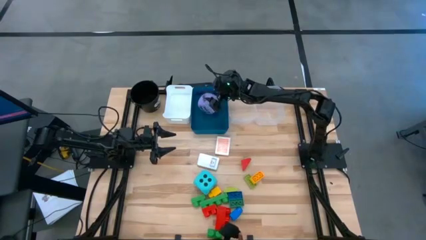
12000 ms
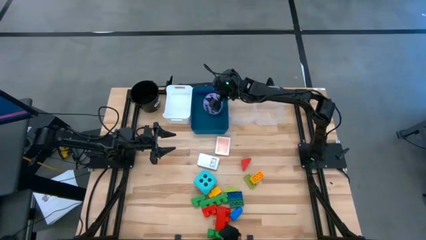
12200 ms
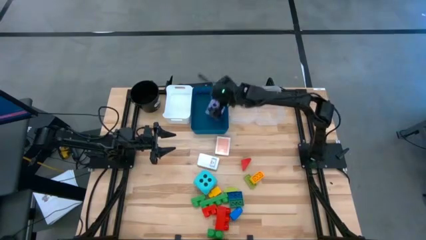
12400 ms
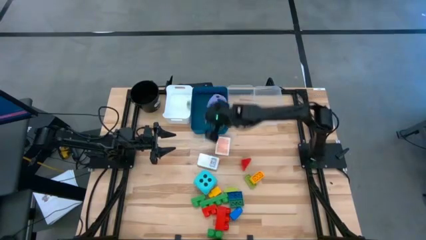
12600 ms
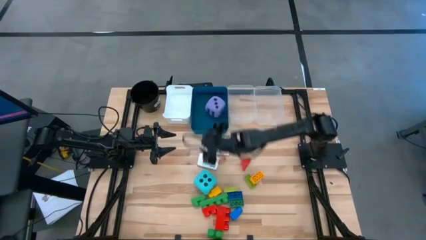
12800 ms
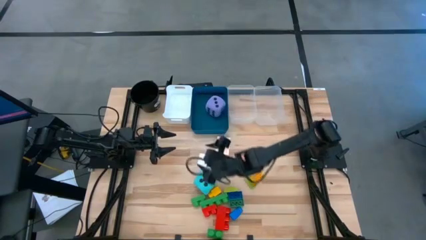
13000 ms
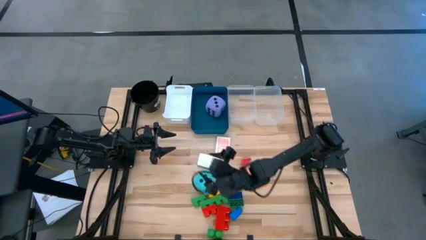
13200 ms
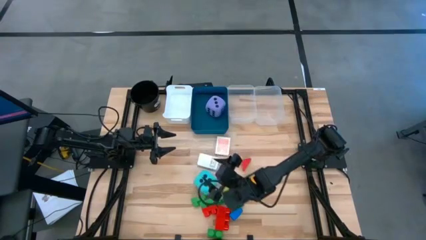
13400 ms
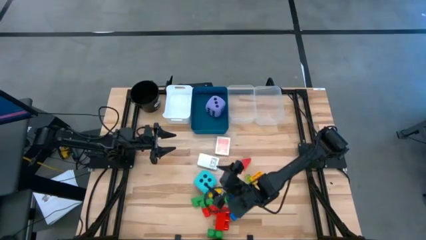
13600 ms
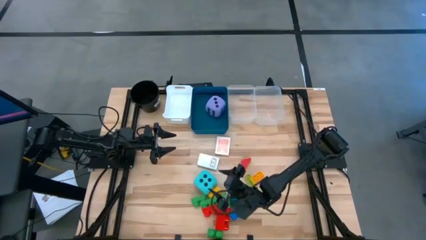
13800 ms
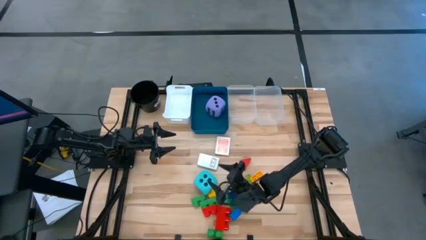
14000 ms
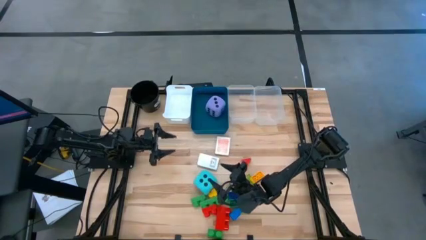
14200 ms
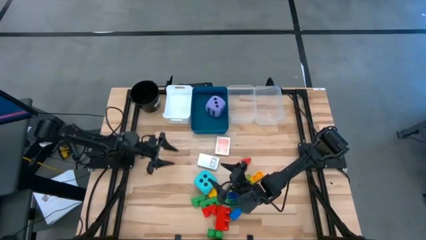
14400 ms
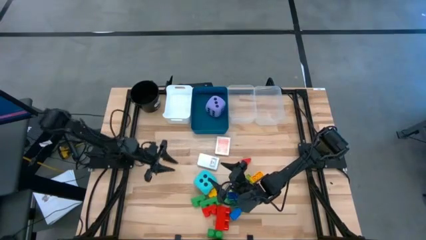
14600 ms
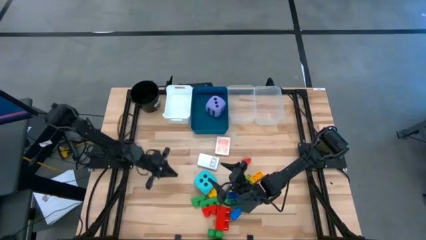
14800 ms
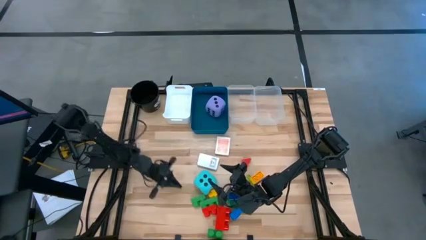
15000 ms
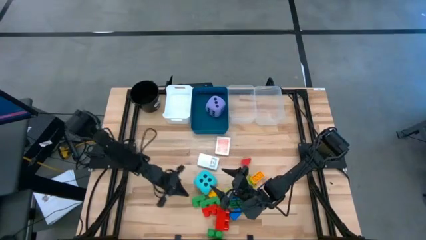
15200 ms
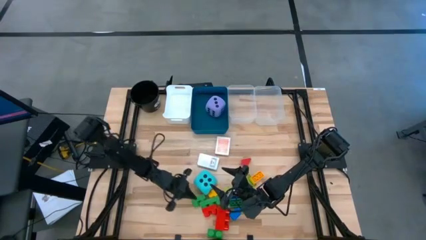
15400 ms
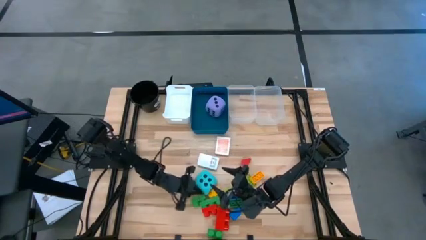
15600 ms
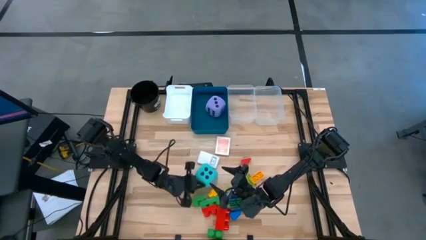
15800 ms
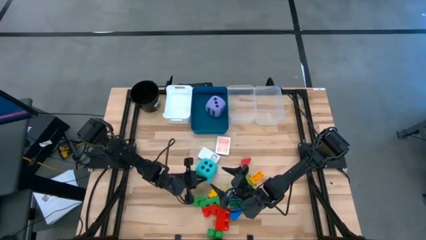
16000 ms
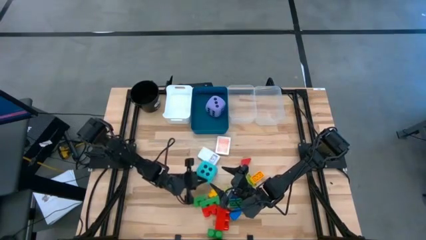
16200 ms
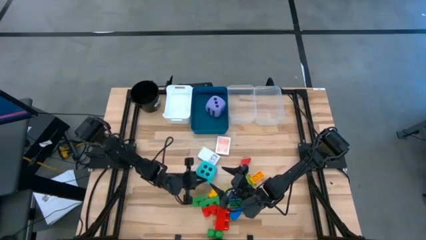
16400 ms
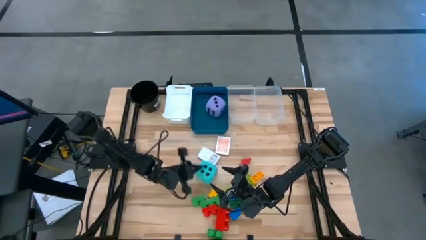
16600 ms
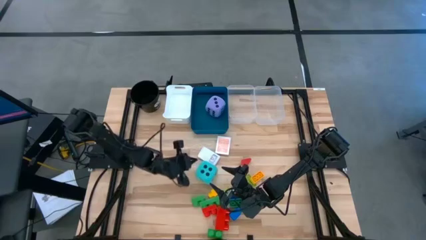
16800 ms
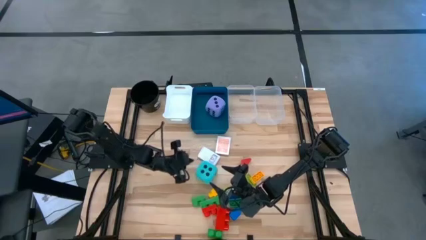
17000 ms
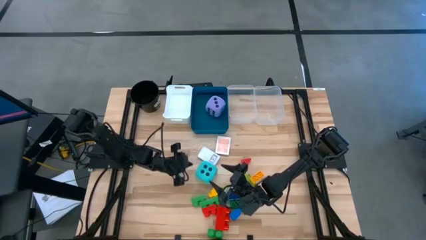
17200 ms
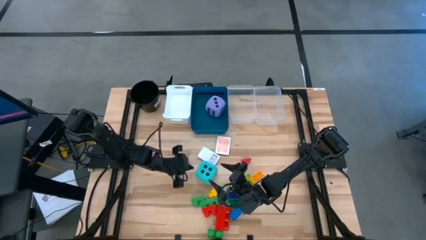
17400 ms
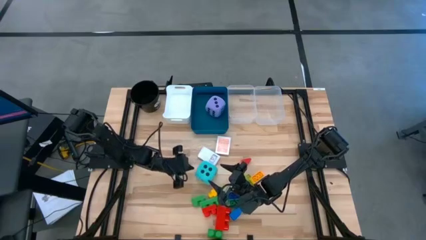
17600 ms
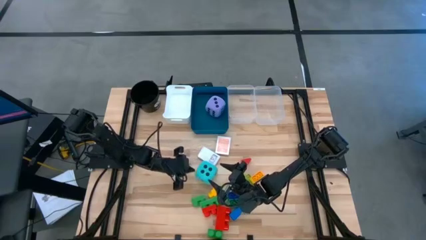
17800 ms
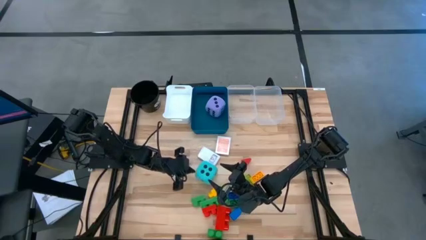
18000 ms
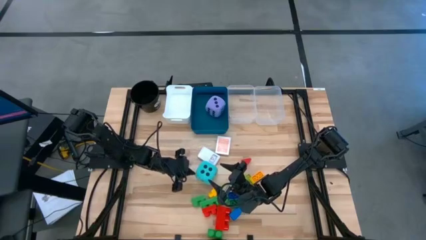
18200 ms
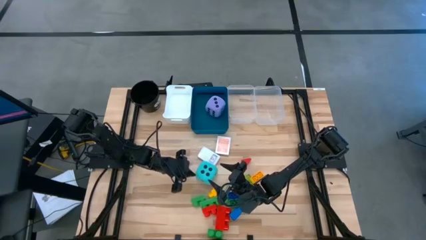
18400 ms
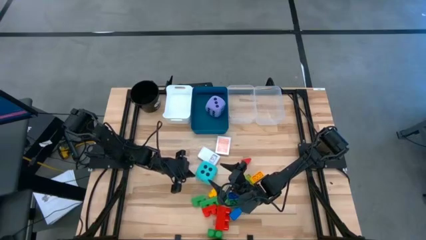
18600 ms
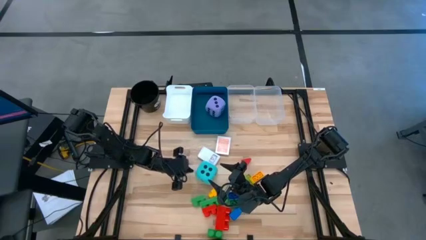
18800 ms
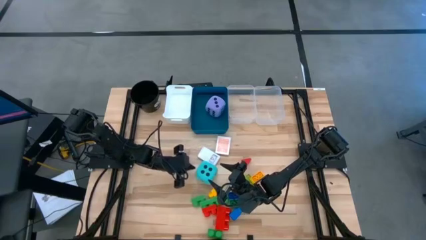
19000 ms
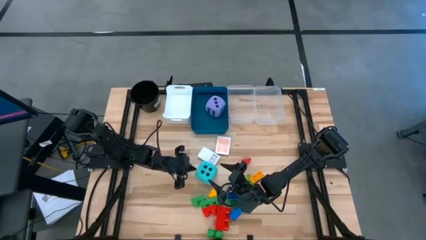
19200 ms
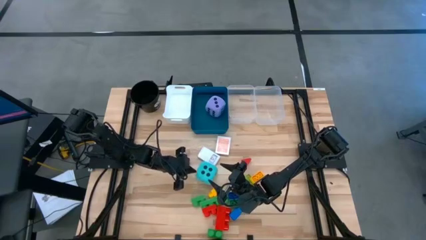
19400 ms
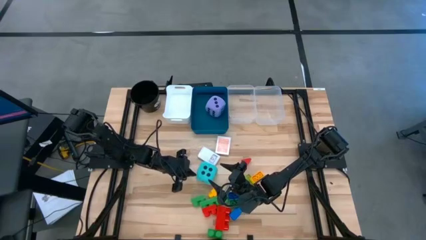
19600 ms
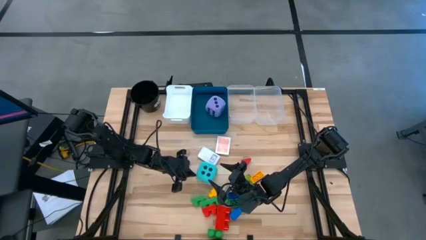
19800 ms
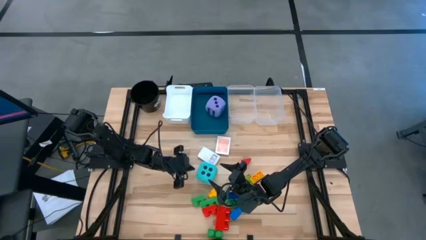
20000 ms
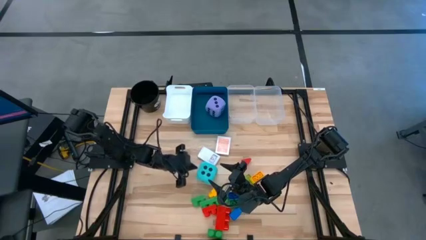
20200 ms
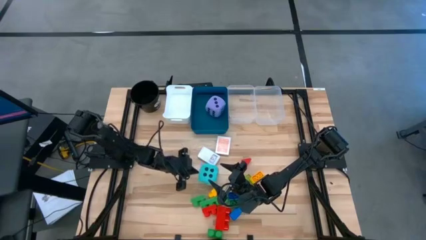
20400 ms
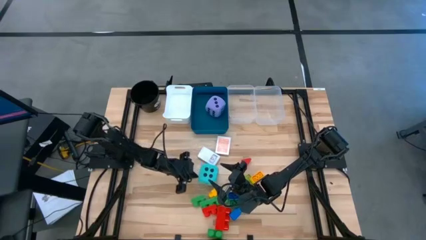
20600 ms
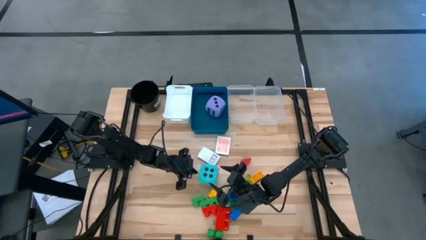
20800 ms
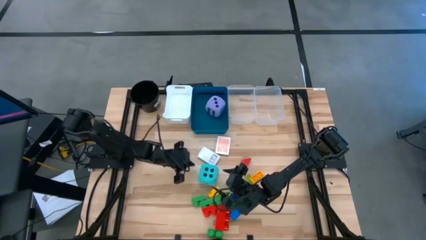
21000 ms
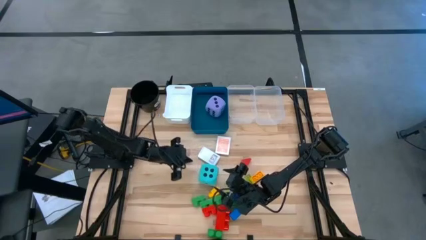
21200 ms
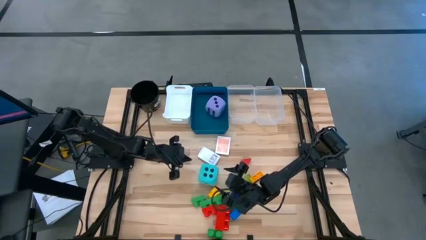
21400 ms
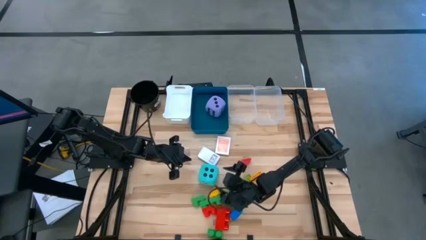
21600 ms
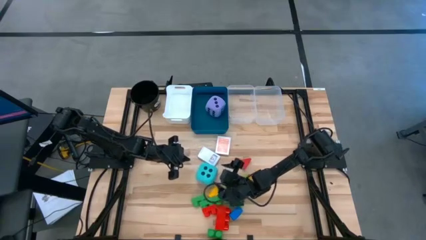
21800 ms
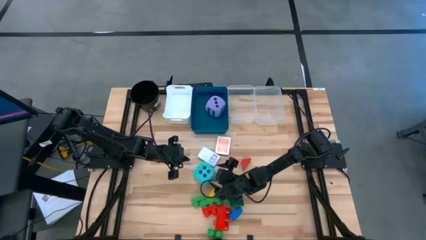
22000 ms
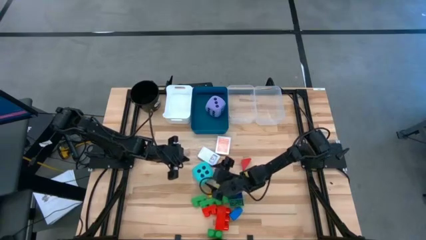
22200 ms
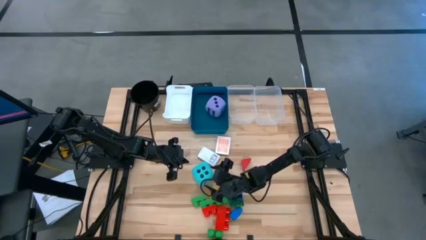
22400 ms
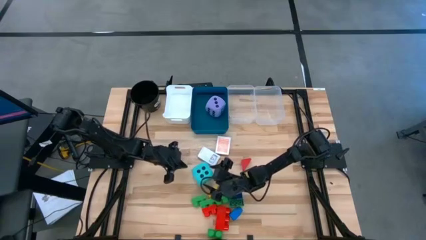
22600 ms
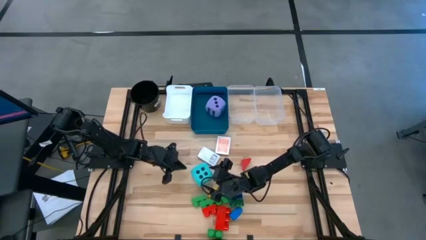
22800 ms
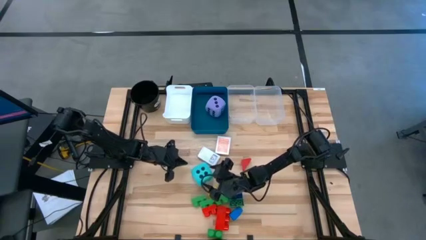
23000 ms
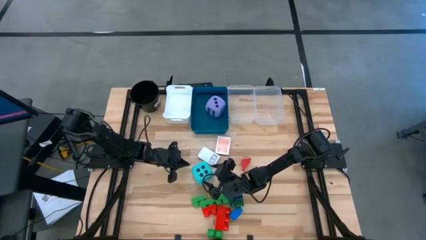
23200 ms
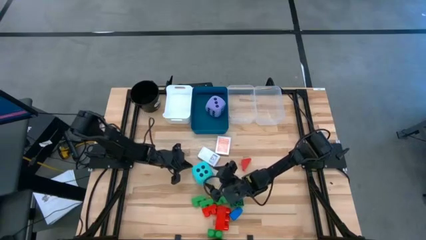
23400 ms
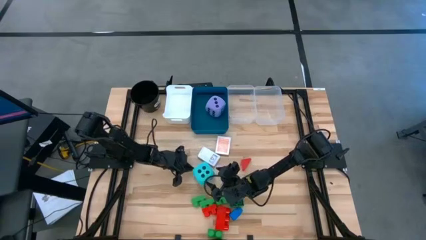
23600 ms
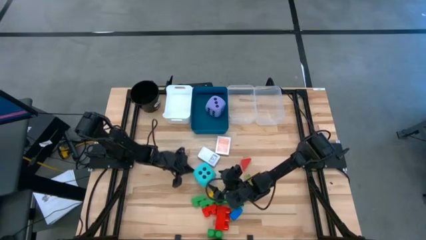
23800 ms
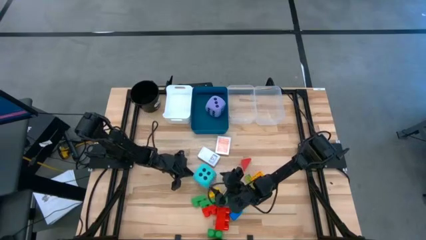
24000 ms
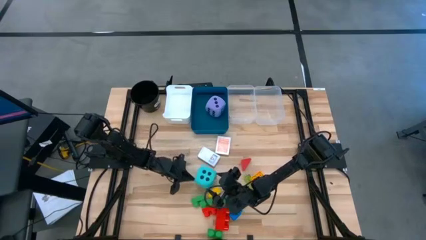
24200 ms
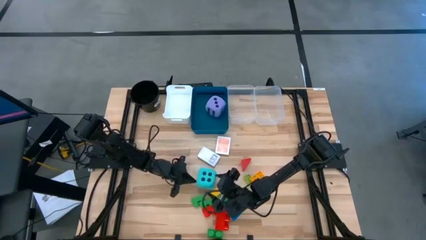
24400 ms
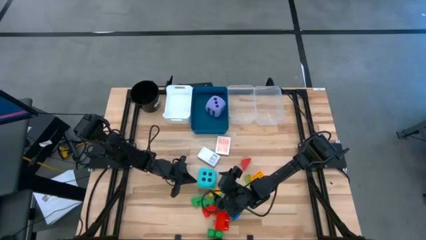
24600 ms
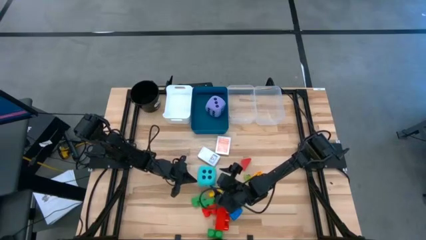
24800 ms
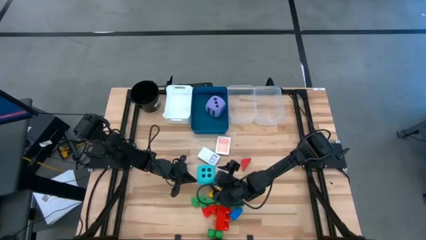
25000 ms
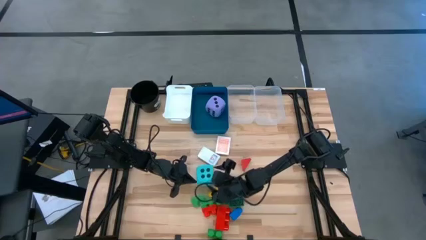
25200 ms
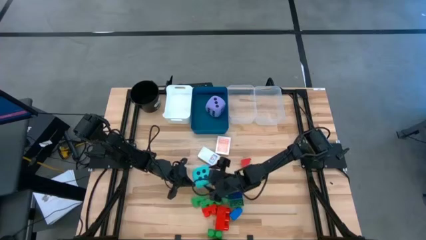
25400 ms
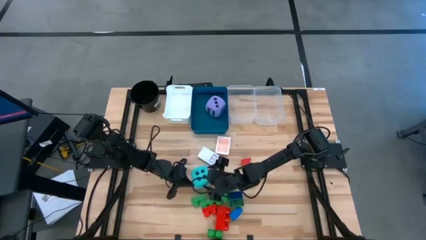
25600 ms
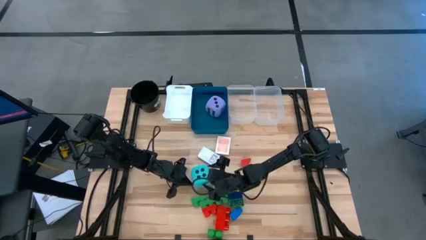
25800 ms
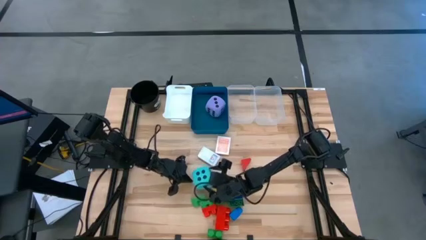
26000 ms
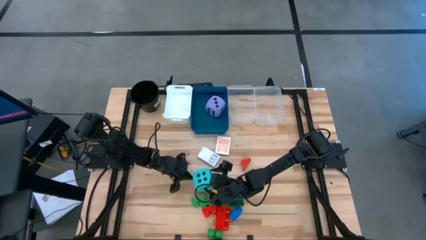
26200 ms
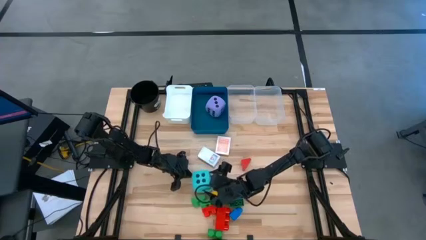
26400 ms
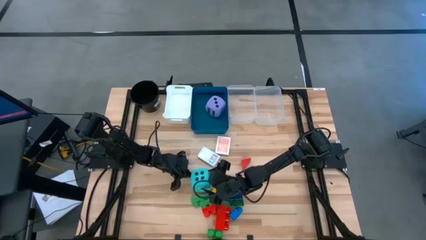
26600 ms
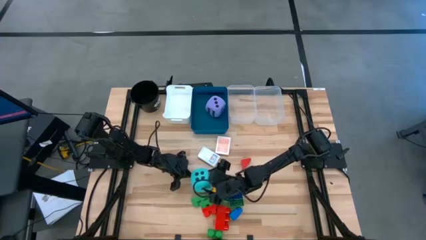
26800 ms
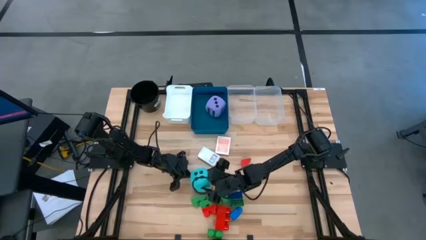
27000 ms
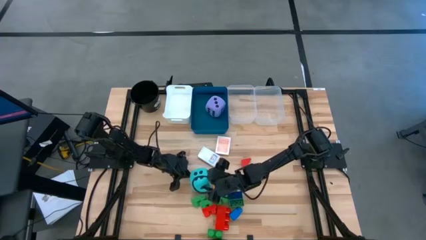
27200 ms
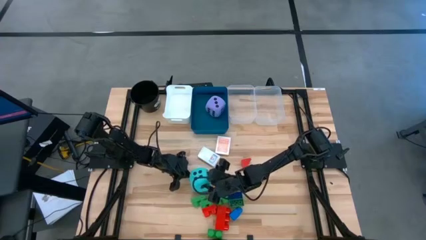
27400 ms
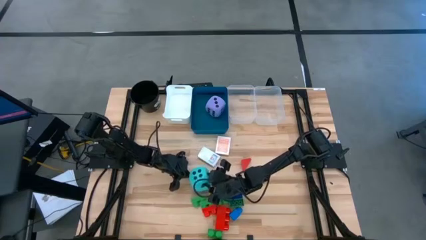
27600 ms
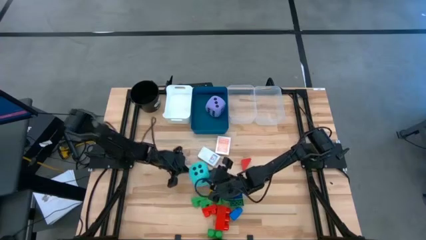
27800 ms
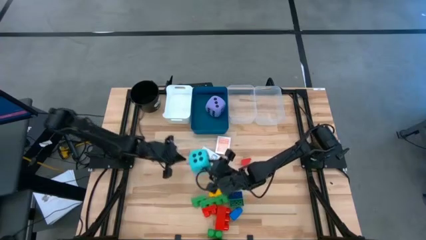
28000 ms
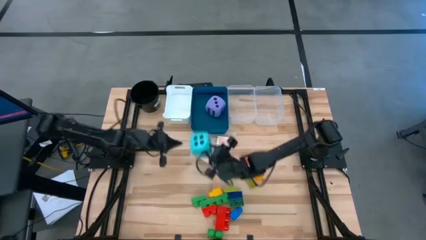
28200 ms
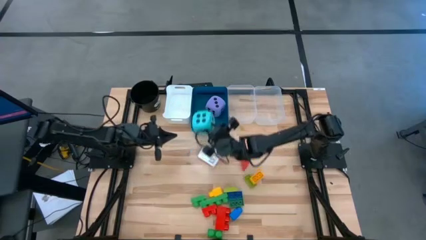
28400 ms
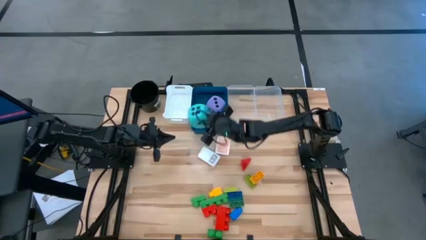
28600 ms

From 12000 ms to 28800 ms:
Task: Pick & Place Toys
Put the blue dice into the blue bin
